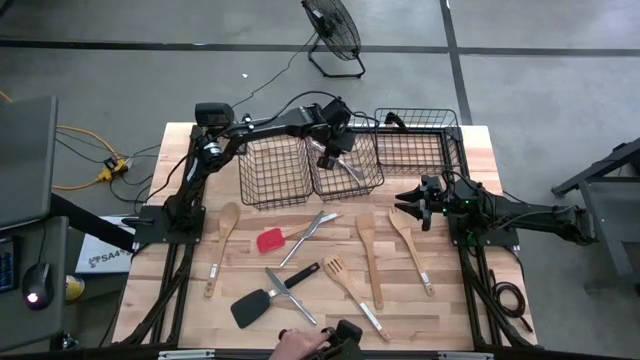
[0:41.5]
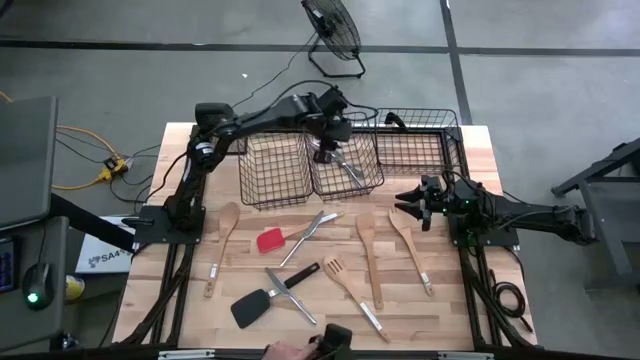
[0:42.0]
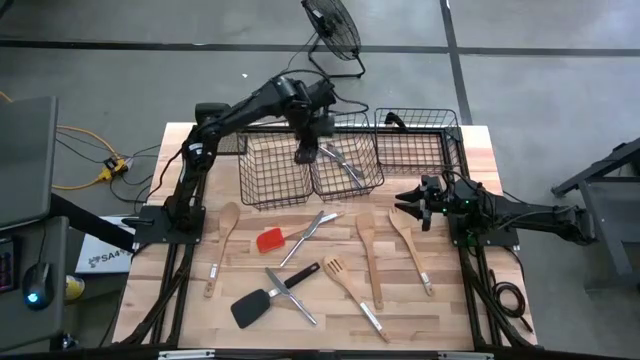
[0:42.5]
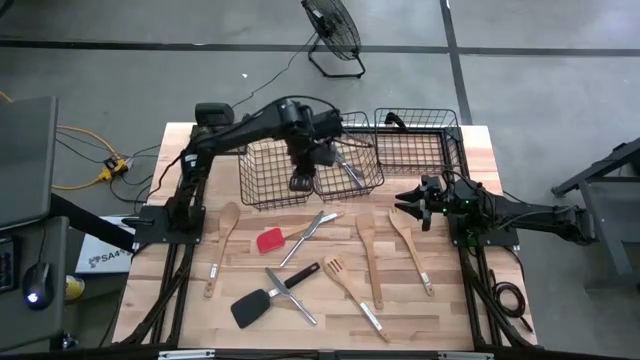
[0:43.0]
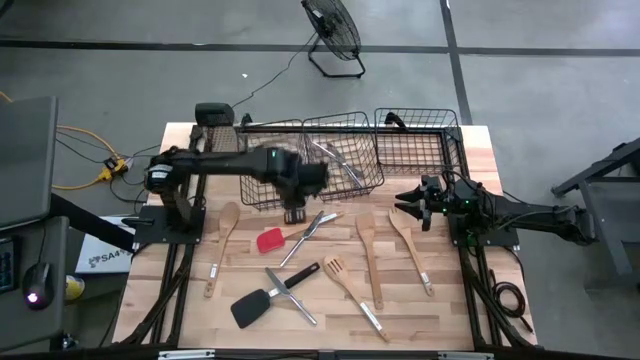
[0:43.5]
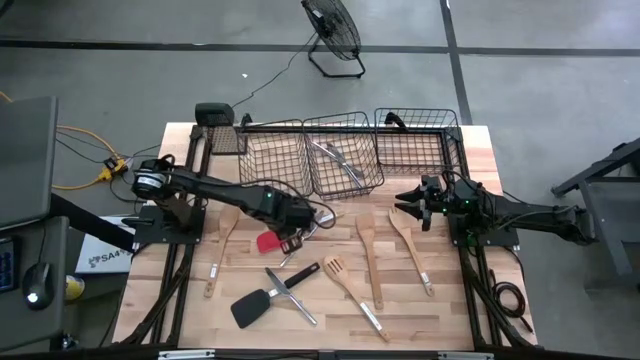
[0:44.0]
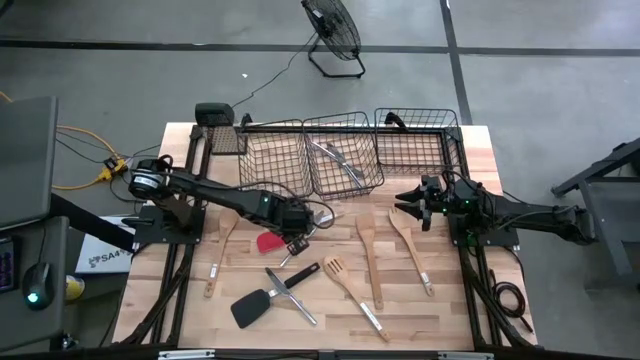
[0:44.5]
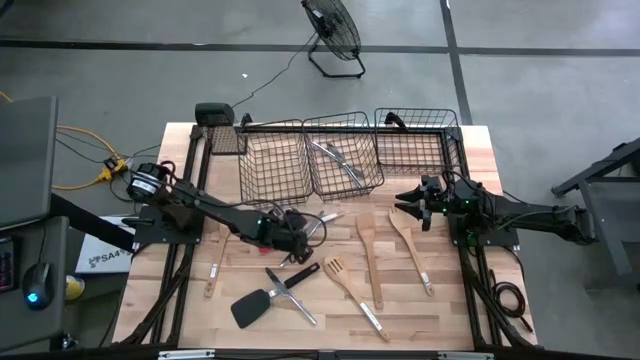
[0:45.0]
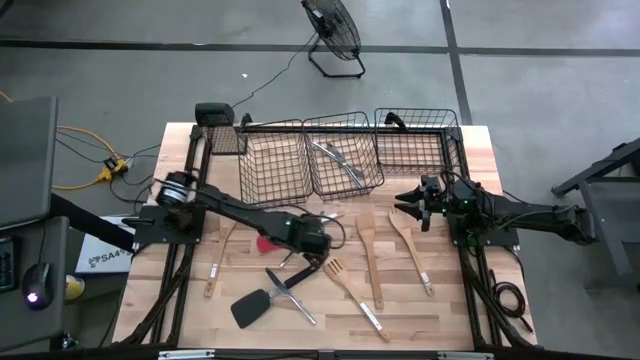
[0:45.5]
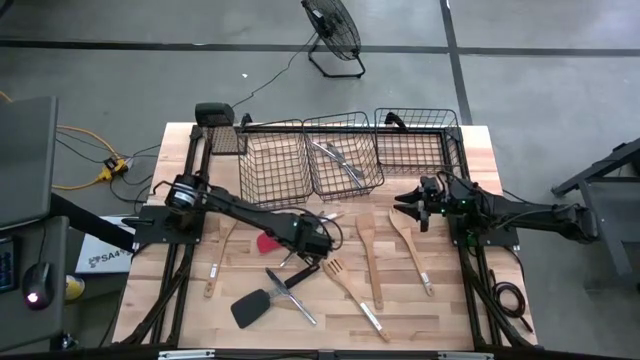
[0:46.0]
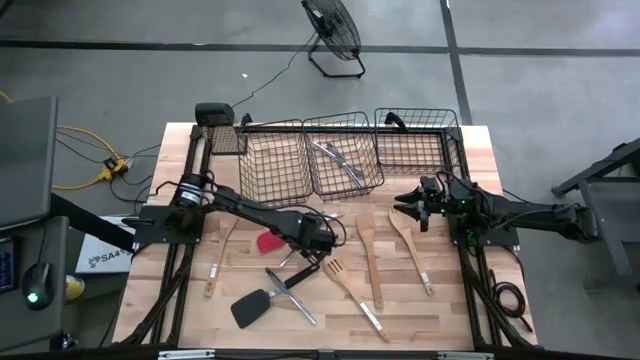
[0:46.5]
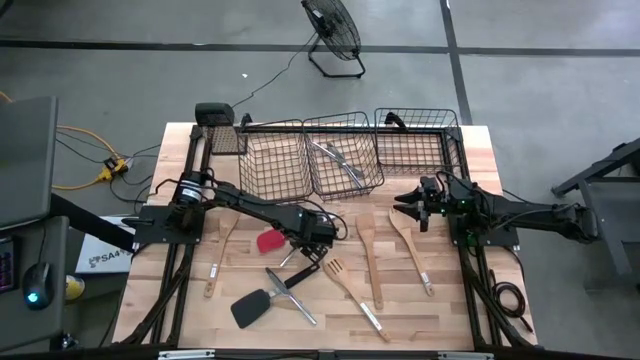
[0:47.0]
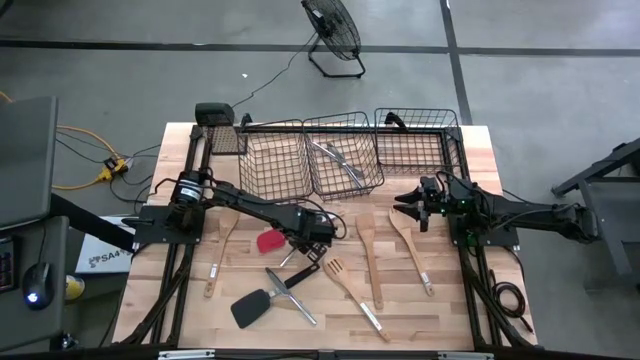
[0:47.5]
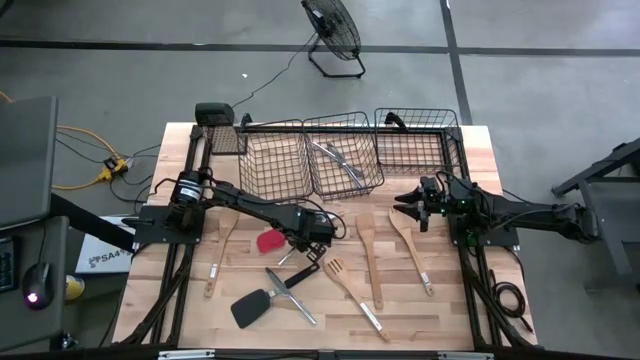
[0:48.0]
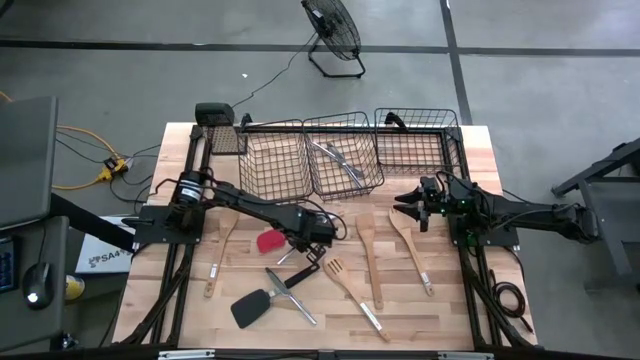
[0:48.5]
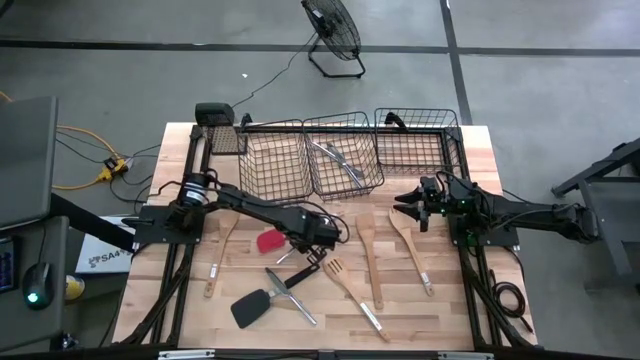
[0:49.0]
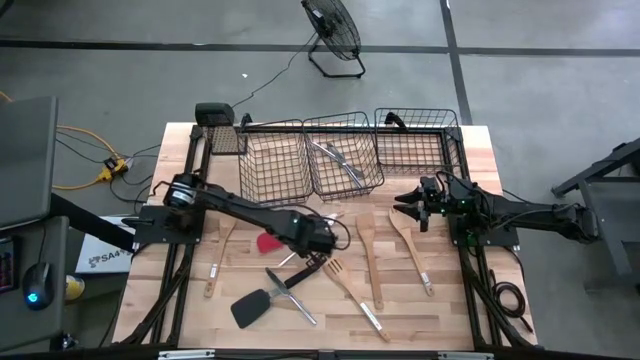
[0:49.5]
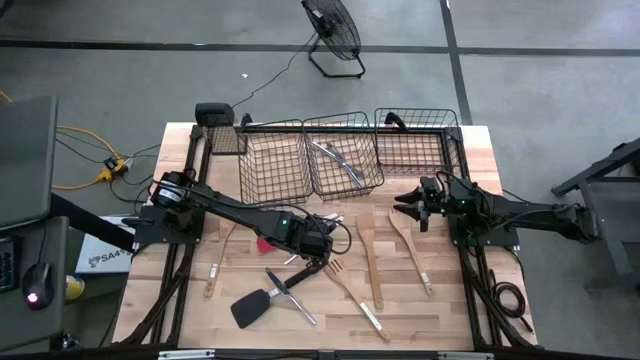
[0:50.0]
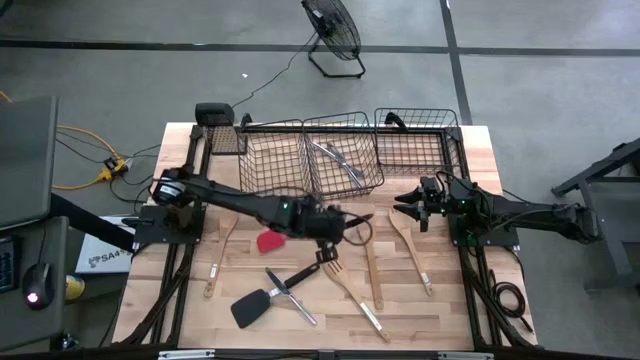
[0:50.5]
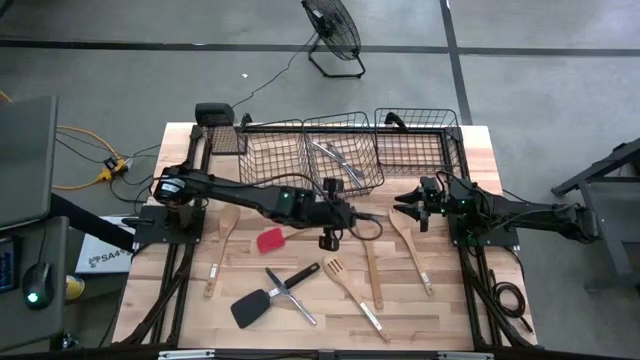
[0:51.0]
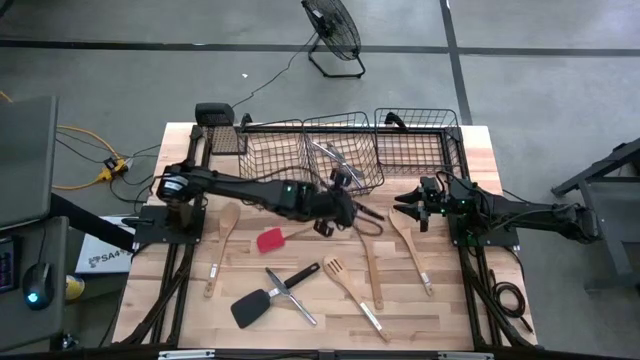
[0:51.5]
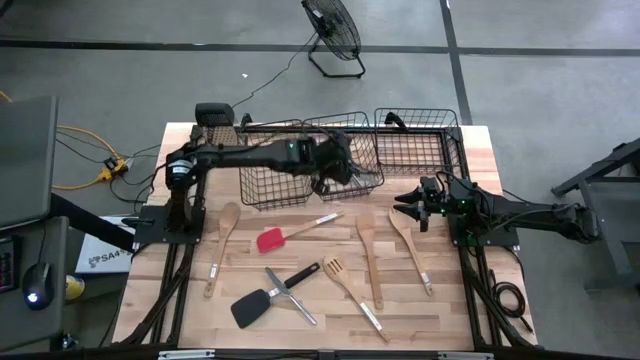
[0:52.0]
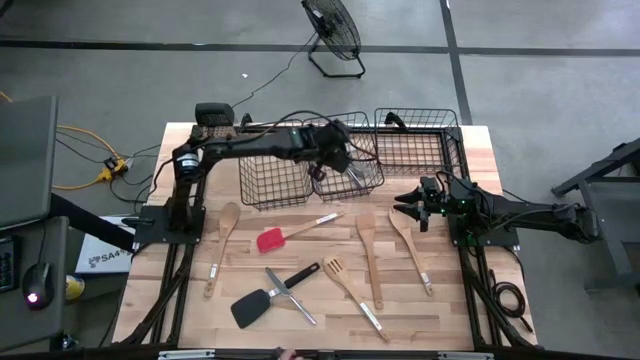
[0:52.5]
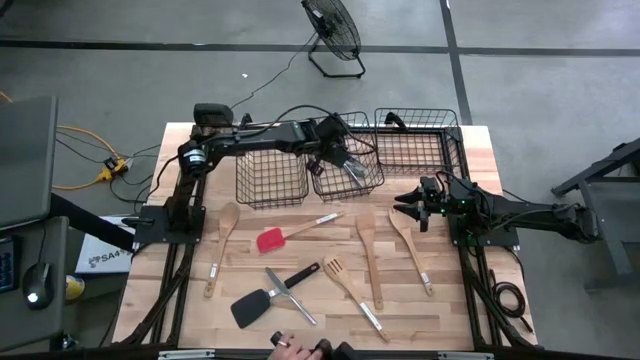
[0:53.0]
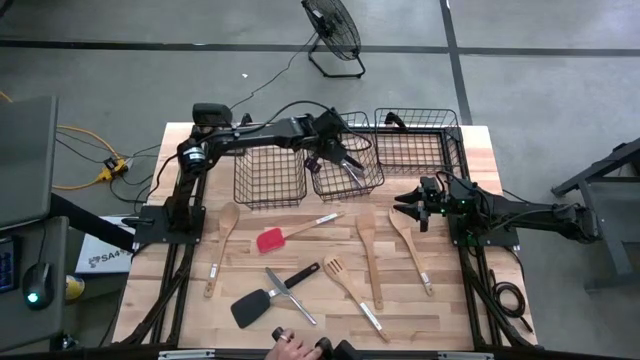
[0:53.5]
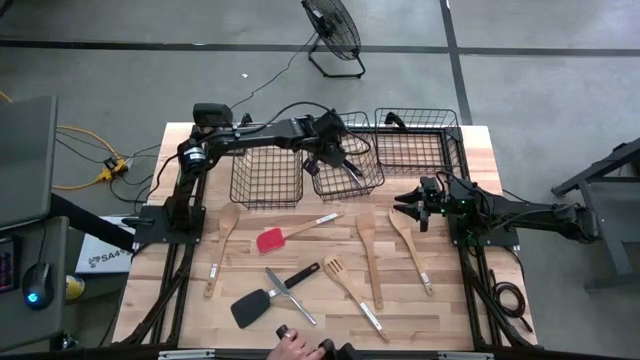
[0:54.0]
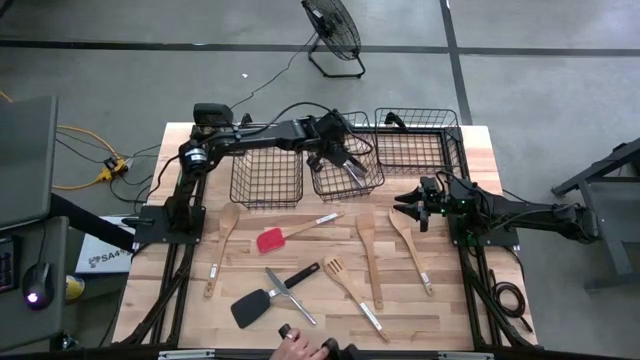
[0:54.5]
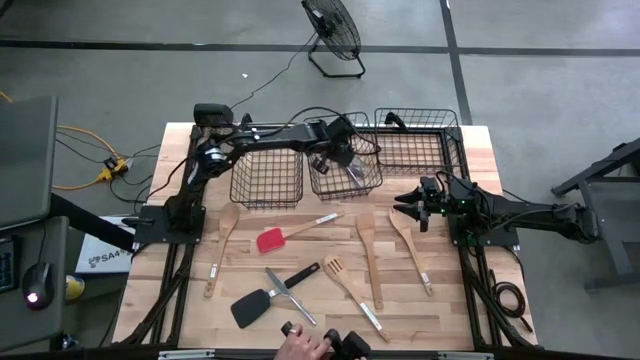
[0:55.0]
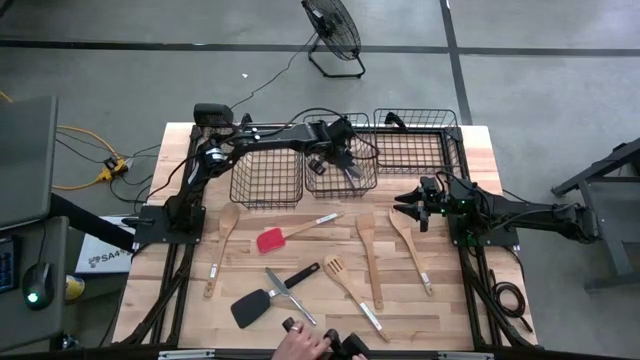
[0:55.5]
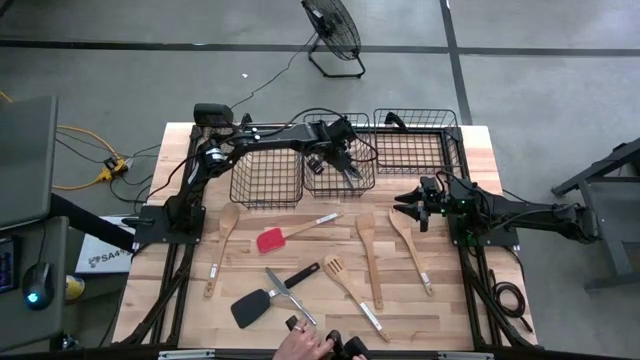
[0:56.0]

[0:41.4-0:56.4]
Task: Pick & Place Kitchen Items
Put the silver knife into the middle wire basket
